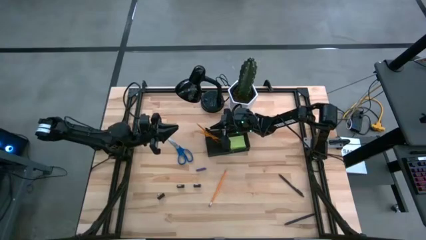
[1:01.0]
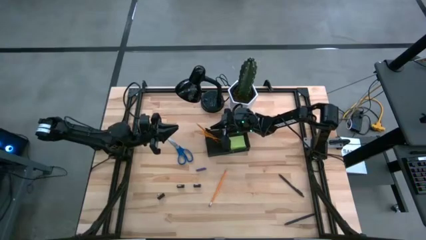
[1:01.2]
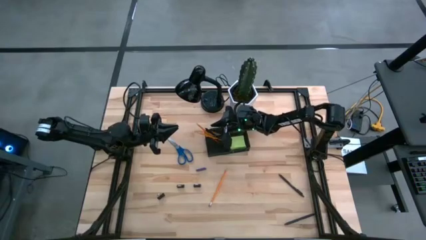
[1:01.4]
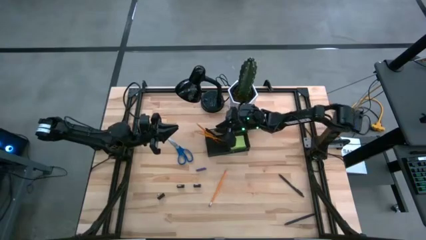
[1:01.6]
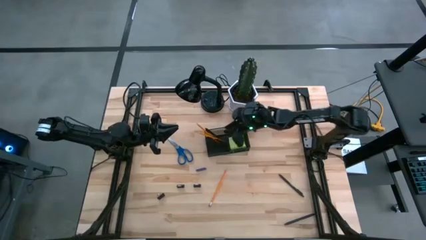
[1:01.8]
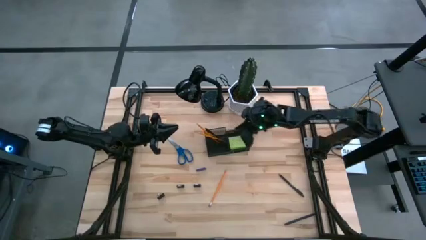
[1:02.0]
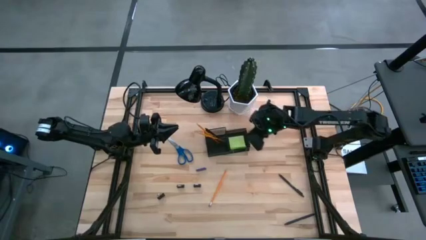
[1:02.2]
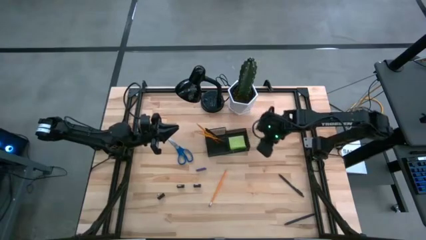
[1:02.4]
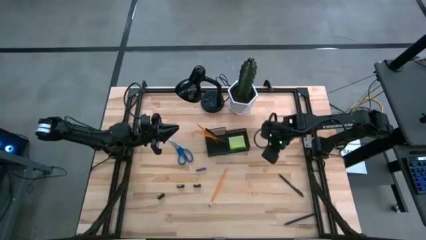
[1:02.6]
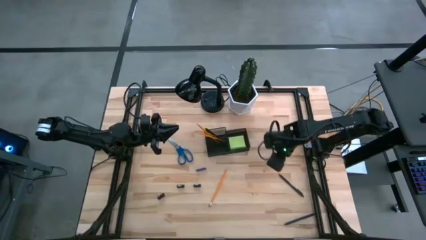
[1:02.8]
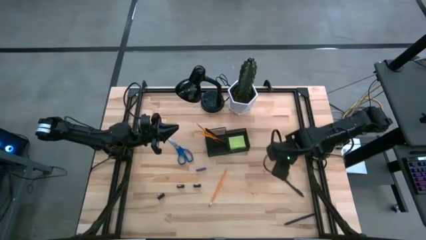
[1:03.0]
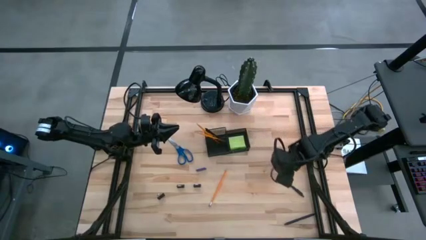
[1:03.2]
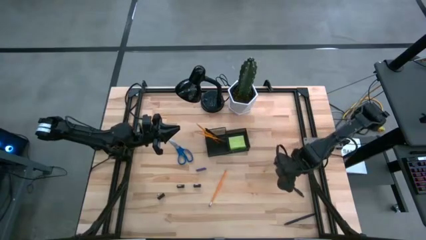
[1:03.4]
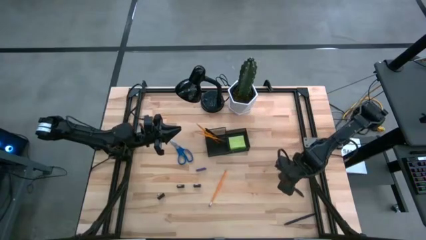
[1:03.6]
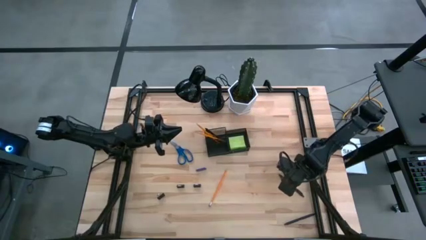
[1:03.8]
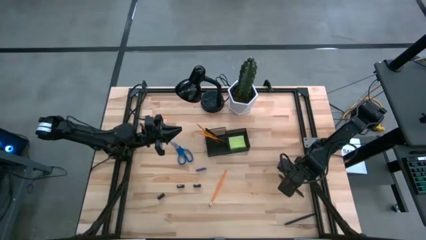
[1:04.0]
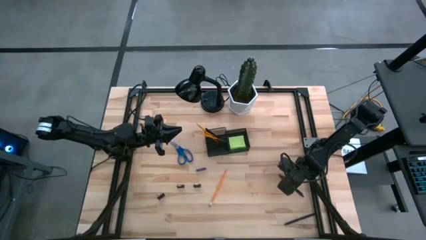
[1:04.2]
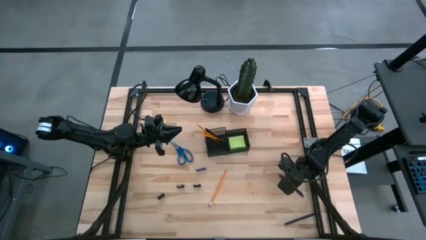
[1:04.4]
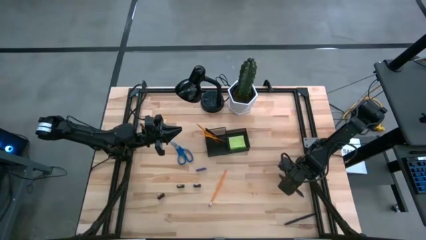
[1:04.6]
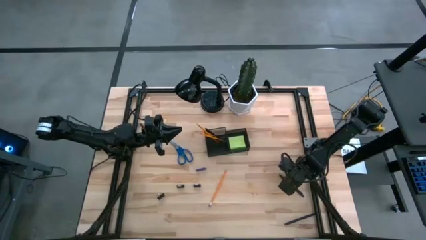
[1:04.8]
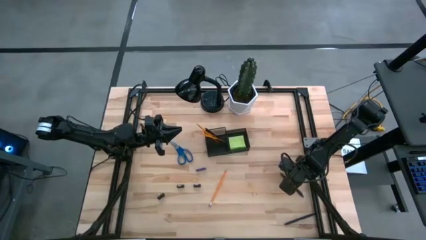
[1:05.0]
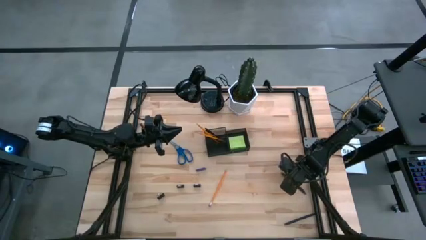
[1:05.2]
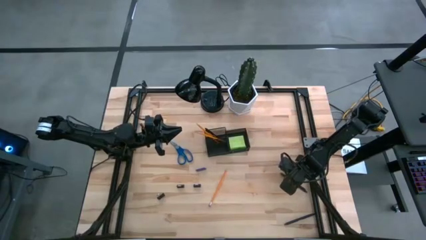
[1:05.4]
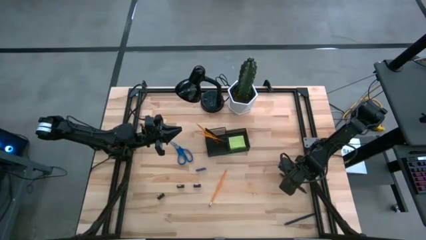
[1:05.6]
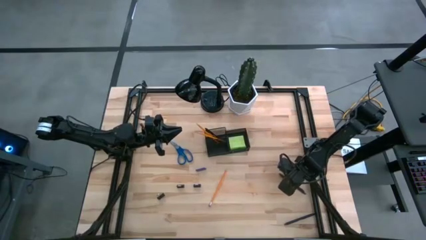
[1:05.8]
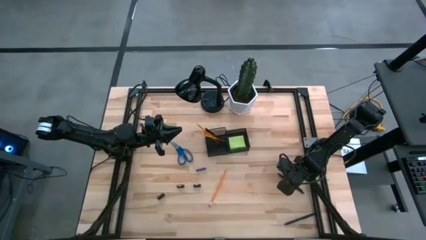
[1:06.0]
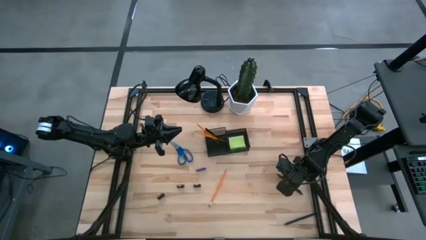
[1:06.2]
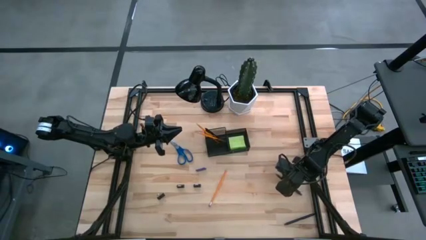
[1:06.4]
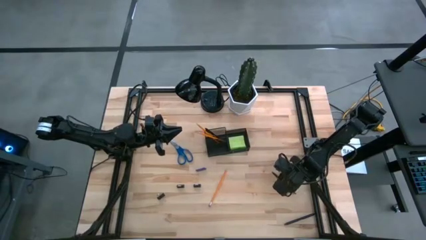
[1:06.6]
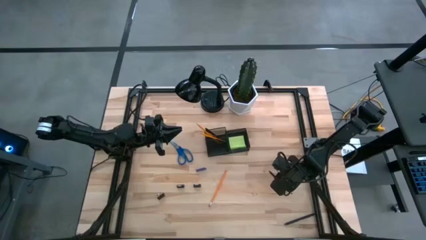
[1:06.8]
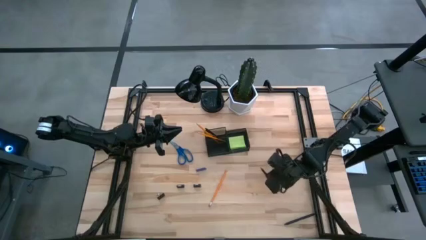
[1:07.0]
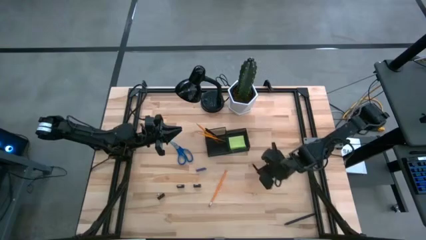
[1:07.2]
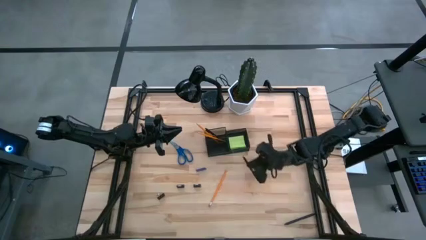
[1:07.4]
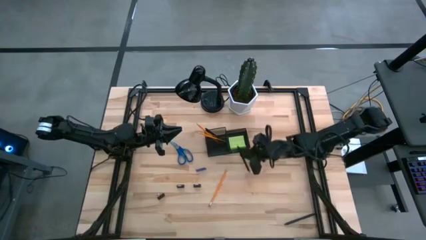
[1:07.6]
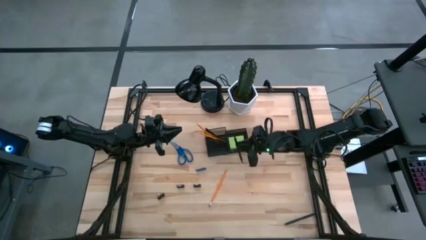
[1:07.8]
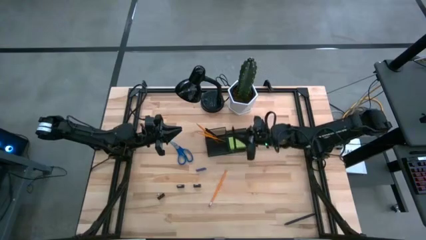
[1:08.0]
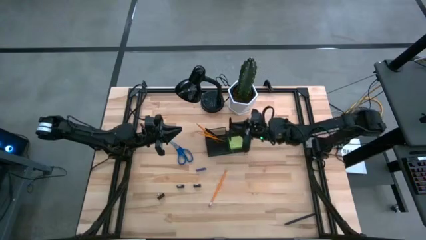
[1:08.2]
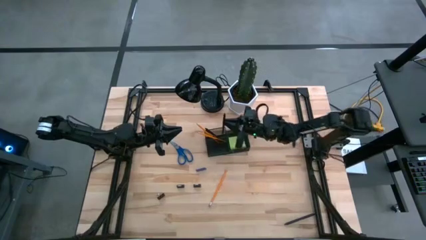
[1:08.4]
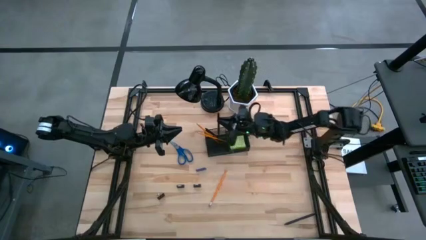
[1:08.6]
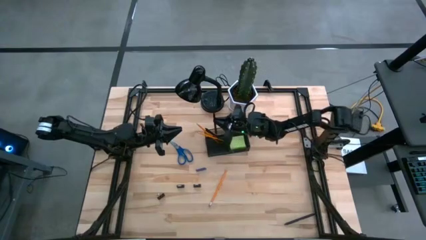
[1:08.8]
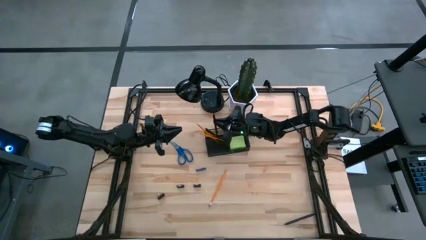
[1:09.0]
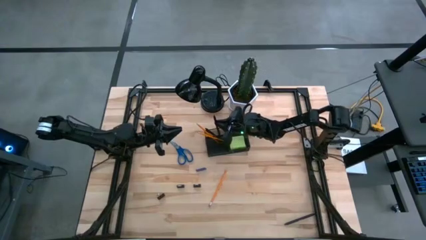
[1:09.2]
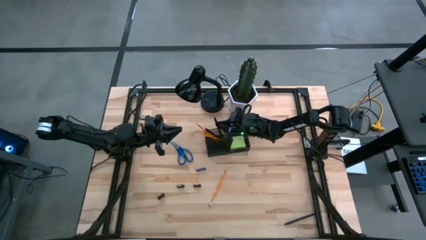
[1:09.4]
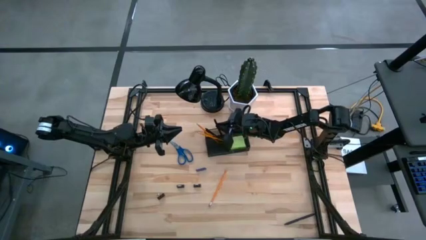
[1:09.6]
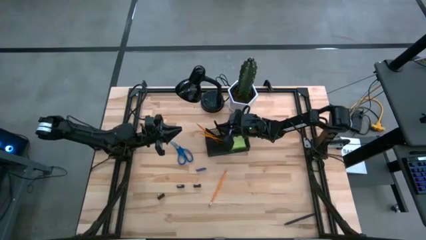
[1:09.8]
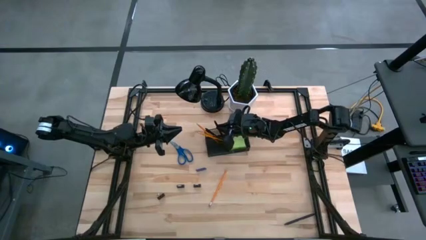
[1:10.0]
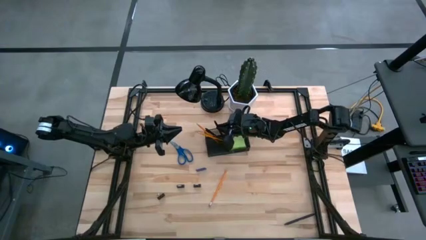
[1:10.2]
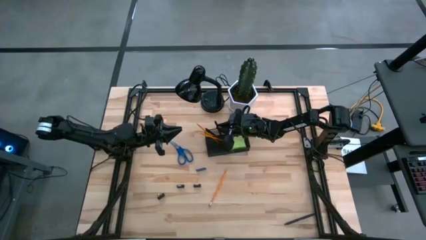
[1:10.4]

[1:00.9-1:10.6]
Task: Pick and place office supplies into organizer
Put the black pen into the desk organizer
